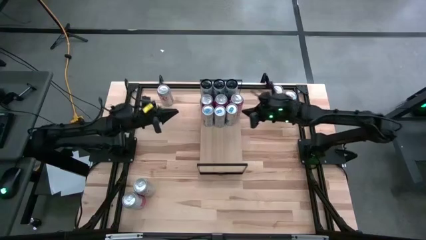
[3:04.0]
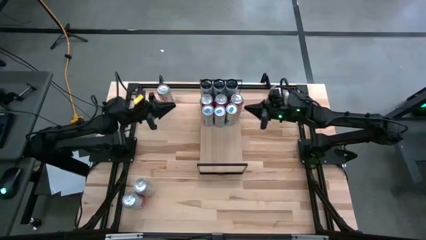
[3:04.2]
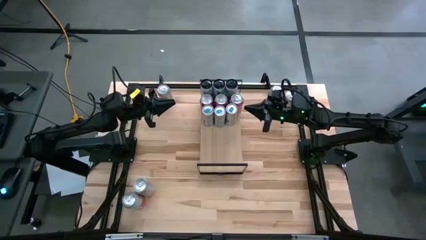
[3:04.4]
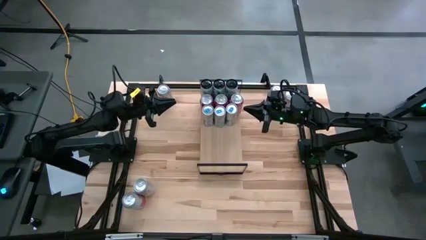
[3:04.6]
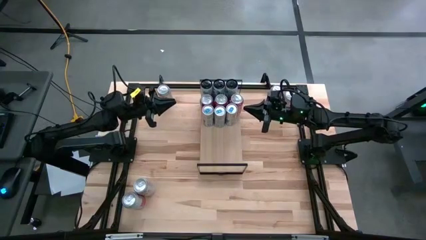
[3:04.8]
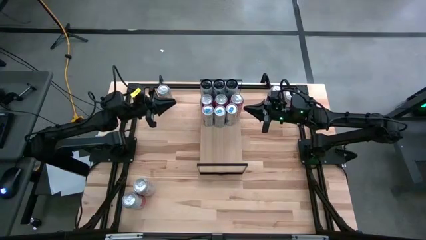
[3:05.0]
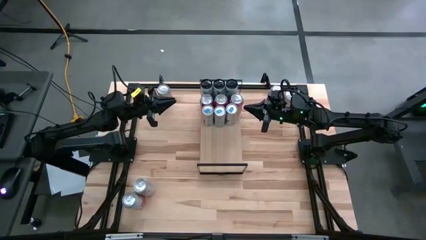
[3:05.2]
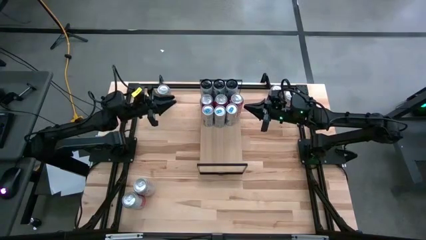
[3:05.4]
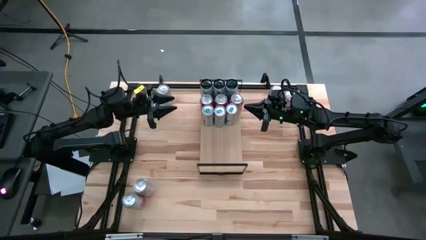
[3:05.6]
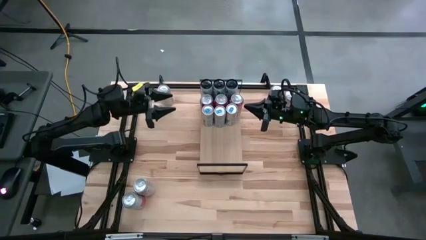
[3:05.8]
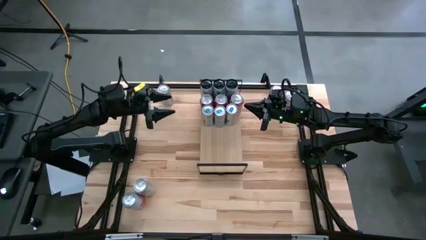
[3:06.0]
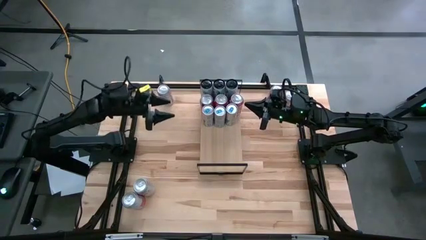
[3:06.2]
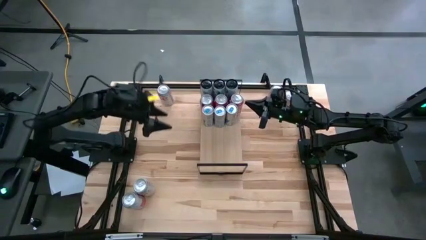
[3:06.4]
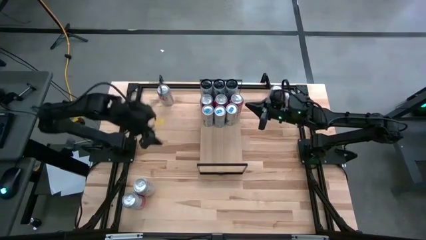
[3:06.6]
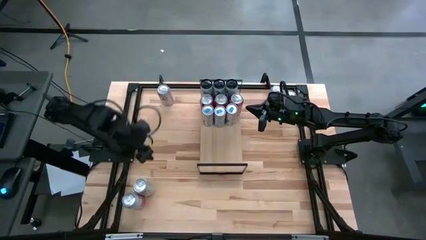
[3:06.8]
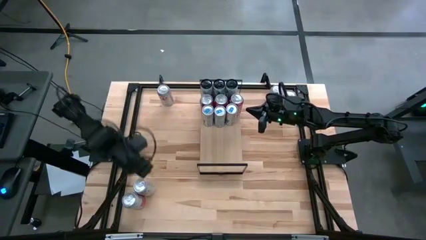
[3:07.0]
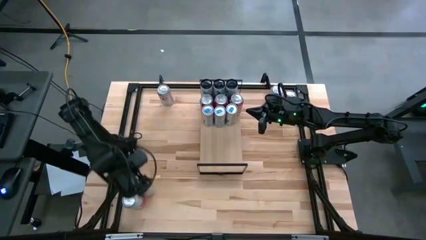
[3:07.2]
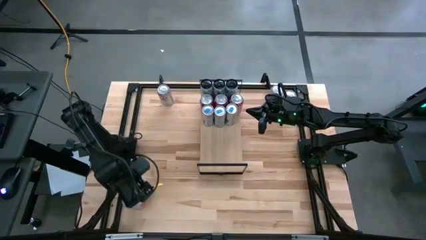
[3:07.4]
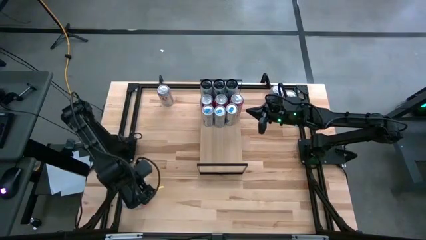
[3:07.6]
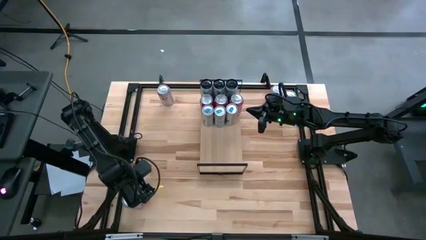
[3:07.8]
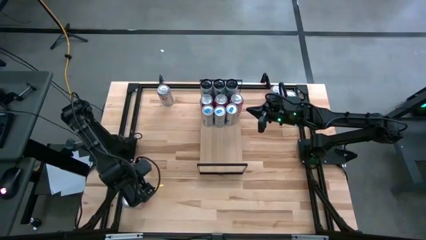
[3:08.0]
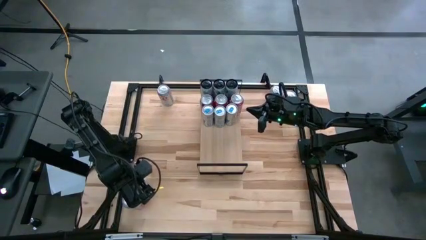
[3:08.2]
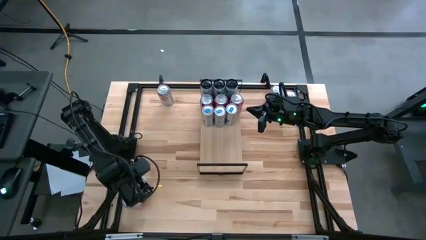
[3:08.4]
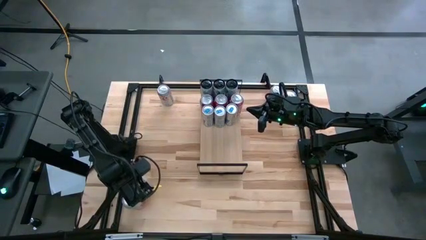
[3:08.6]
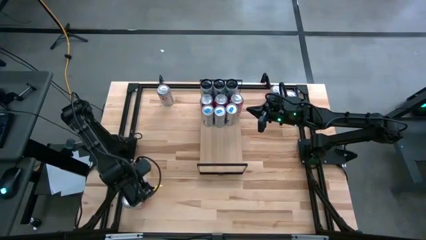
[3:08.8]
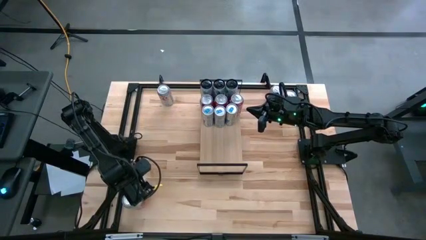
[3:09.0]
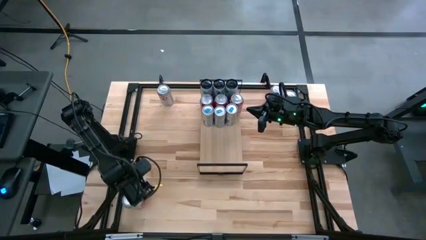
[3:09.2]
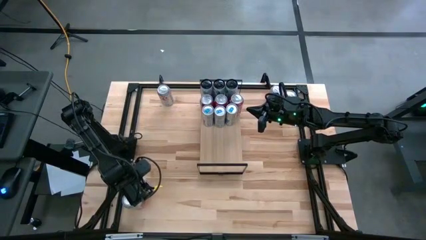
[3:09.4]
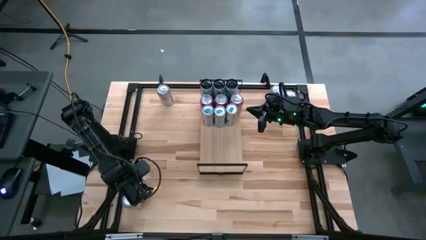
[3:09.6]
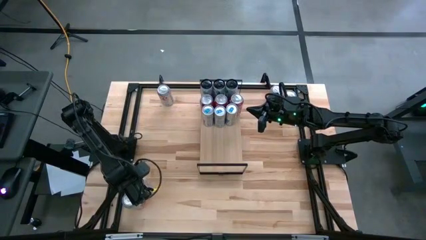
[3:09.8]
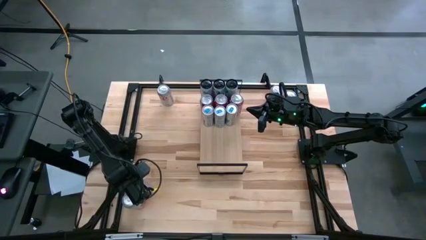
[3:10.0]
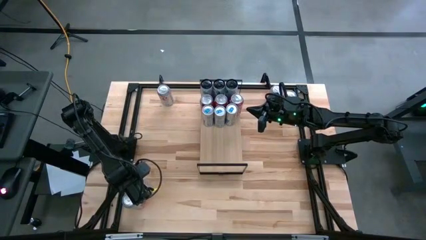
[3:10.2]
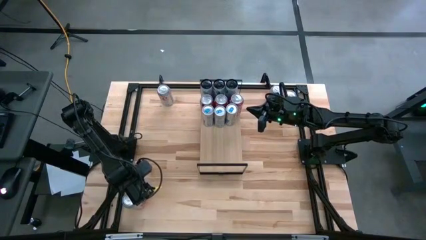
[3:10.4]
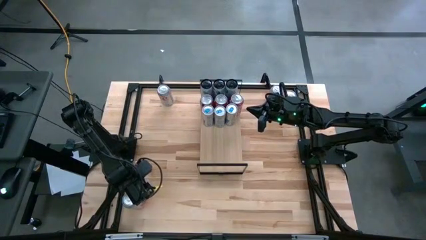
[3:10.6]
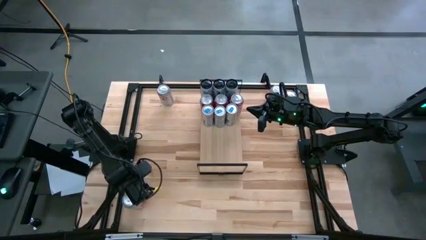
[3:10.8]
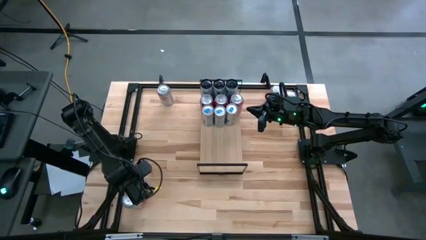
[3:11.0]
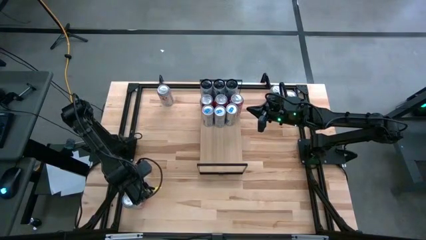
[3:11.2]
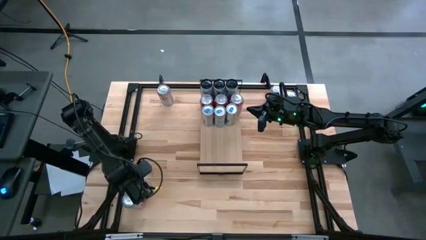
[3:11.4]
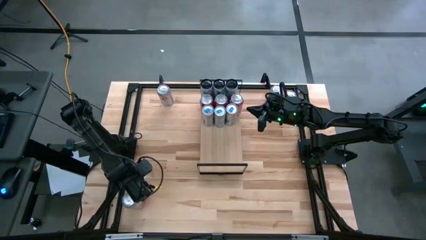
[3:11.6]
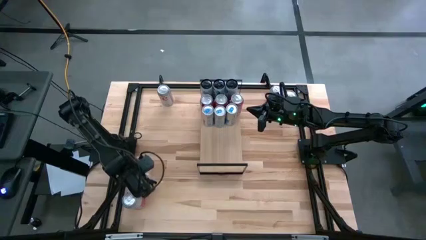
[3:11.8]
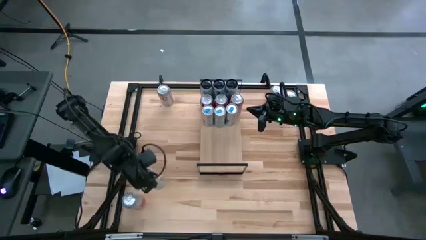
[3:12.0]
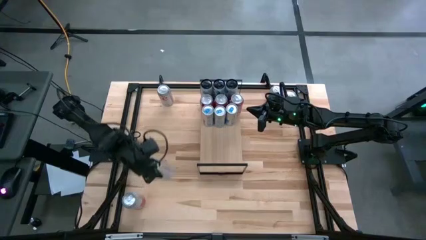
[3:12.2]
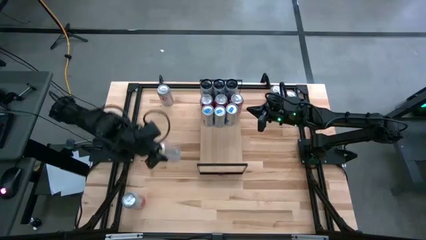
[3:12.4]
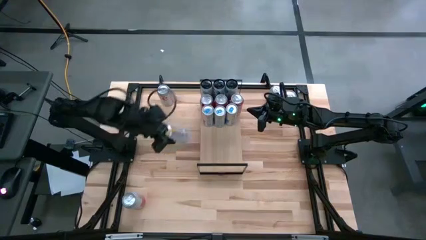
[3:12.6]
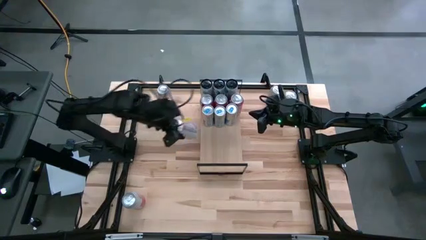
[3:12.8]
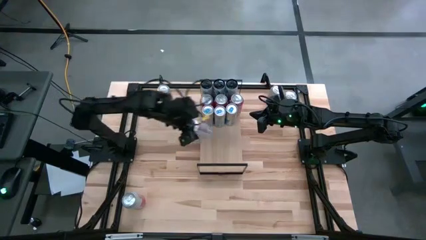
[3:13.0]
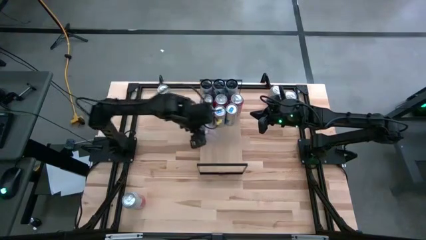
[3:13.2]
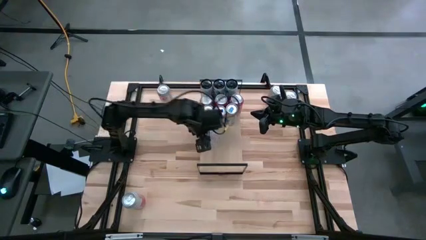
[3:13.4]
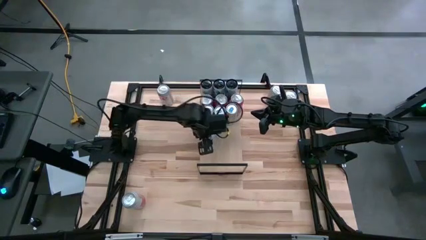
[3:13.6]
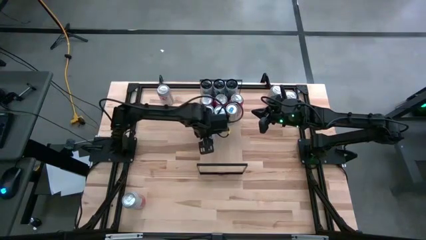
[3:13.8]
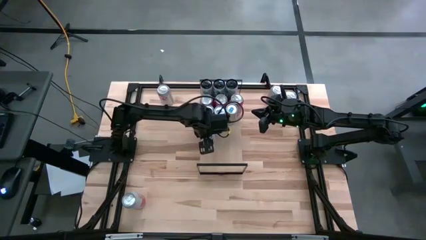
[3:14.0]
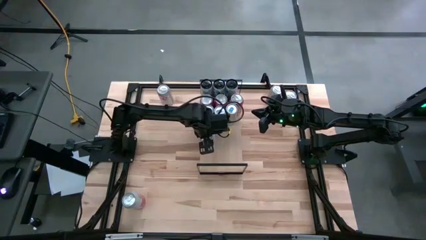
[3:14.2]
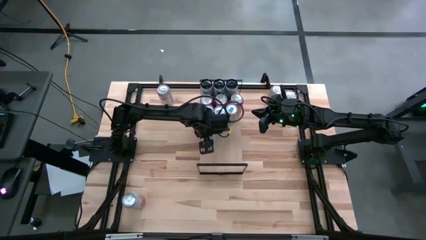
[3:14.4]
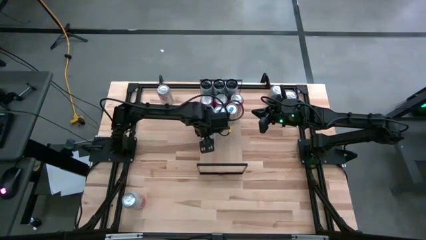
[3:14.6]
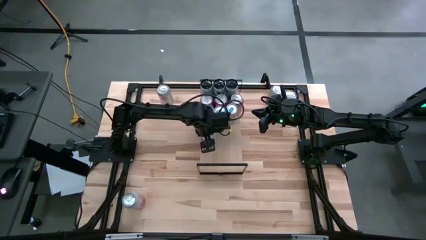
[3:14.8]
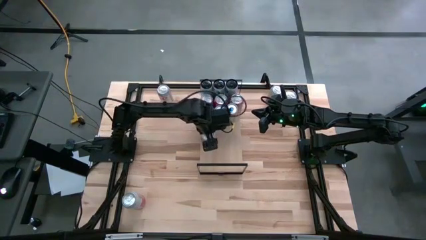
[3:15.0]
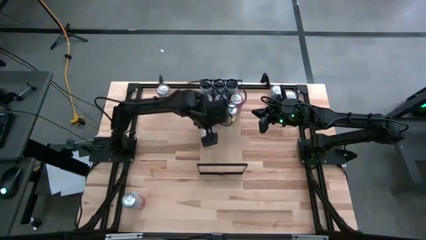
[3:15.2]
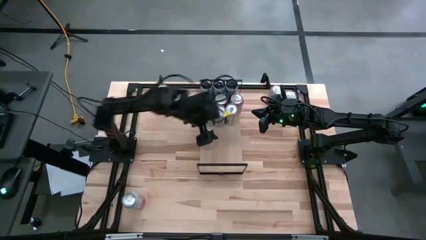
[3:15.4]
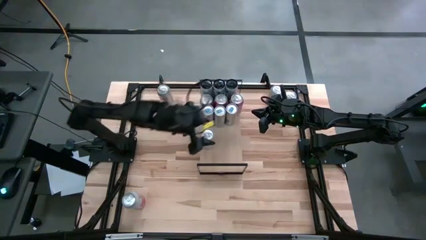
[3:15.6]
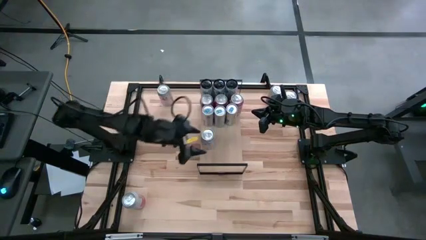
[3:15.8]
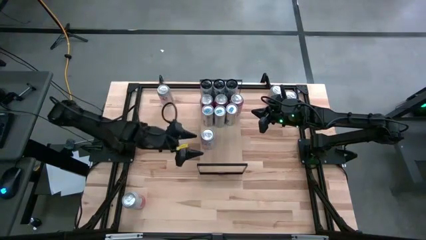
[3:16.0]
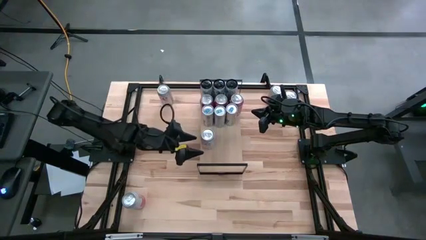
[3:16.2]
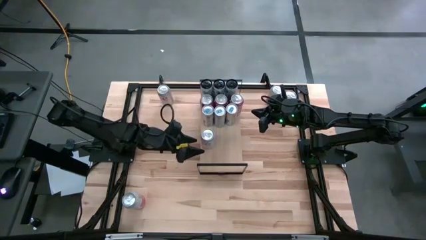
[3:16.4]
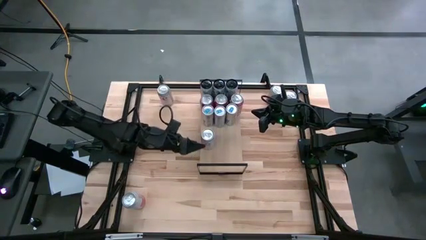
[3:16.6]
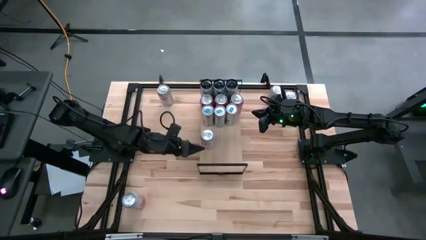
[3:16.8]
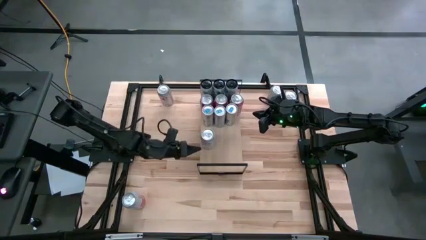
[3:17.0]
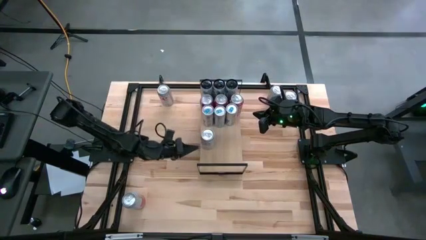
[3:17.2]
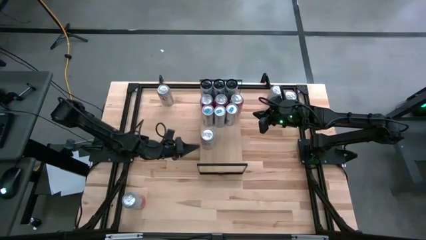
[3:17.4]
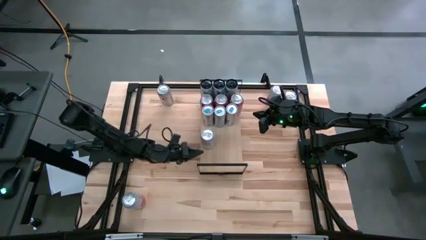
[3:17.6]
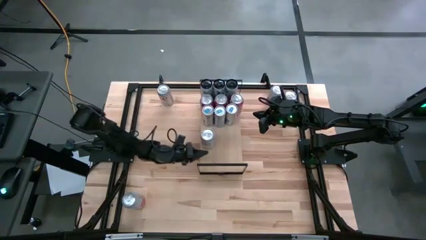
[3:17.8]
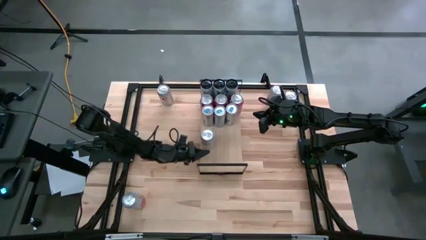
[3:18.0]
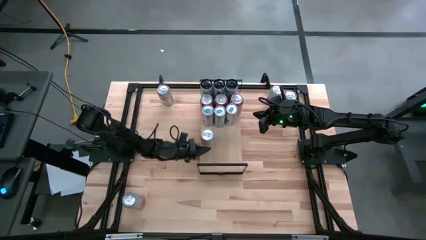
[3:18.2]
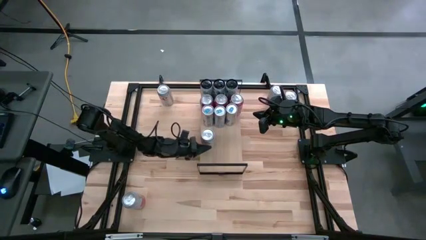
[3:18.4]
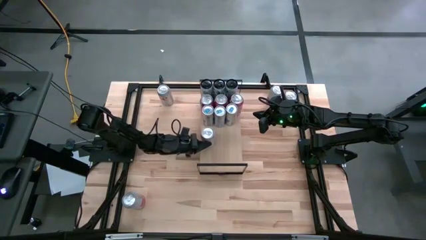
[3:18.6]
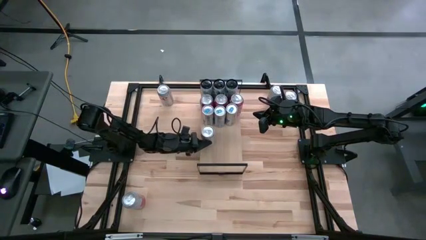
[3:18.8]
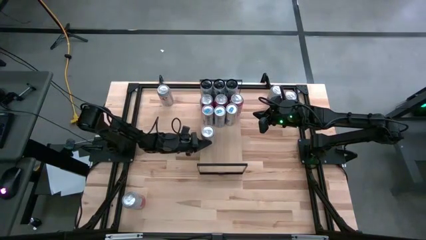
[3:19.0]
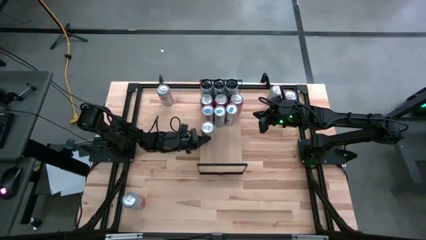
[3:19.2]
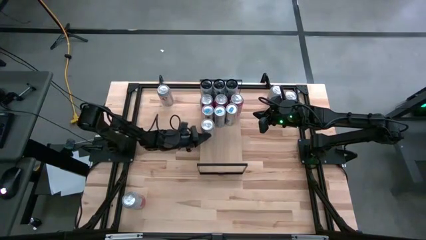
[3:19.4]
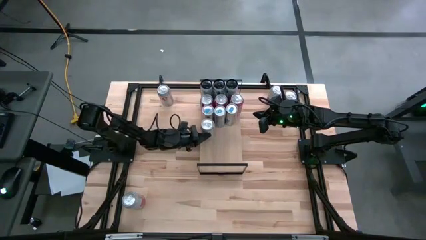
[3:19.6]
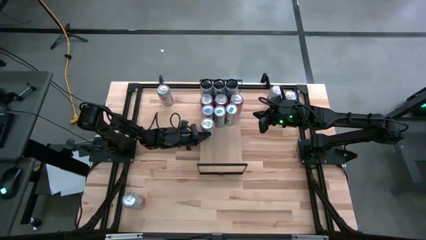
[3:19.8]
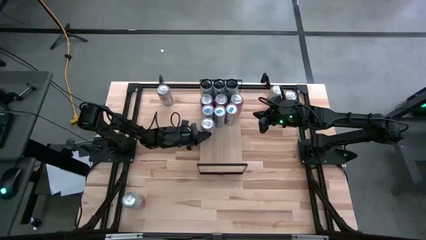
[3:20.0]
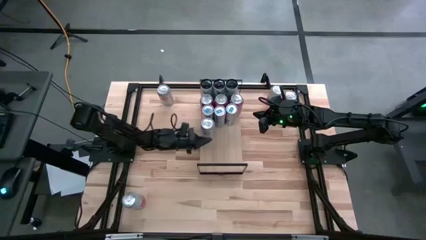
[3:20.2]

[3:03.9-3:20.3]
Task: Place canned beverage on shelf
Put the bottom left red-silver soda can on the shelf
